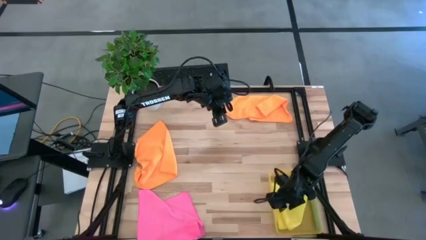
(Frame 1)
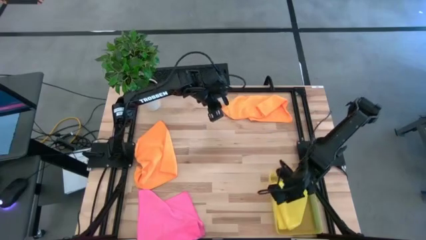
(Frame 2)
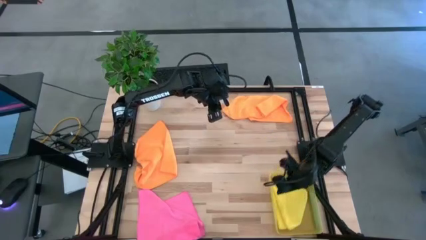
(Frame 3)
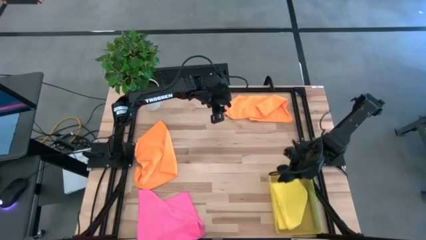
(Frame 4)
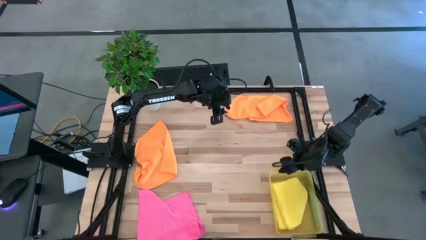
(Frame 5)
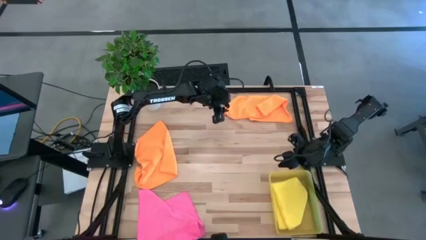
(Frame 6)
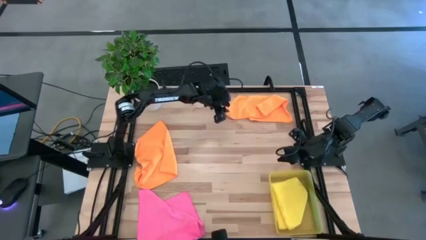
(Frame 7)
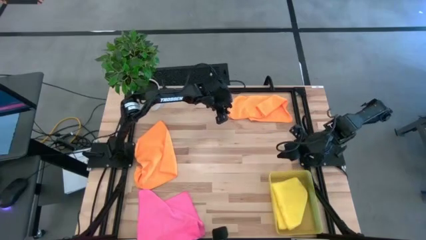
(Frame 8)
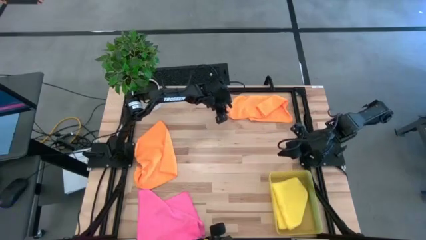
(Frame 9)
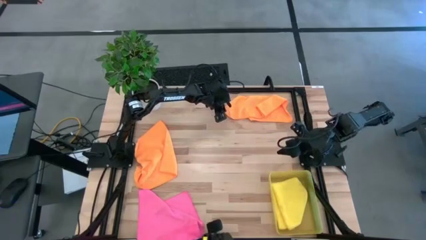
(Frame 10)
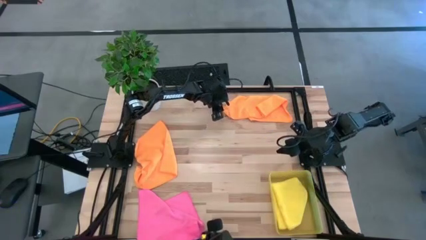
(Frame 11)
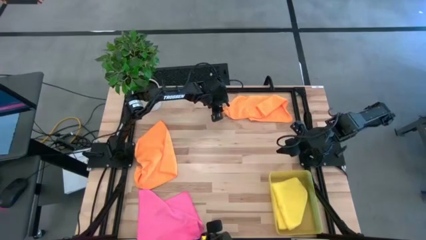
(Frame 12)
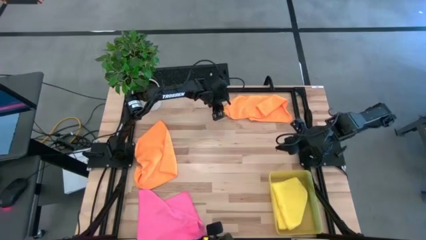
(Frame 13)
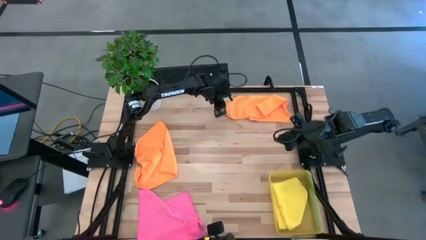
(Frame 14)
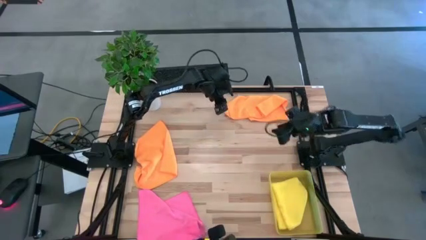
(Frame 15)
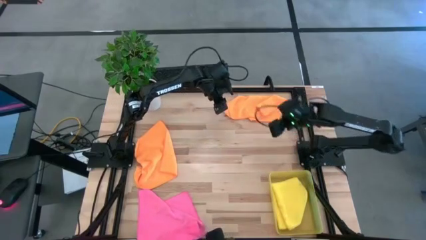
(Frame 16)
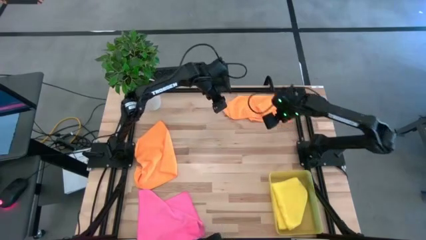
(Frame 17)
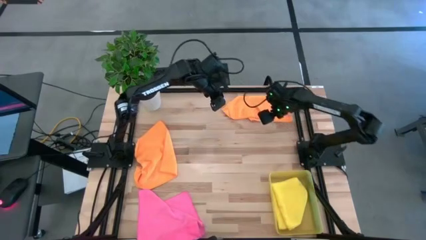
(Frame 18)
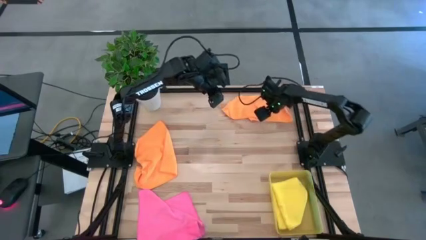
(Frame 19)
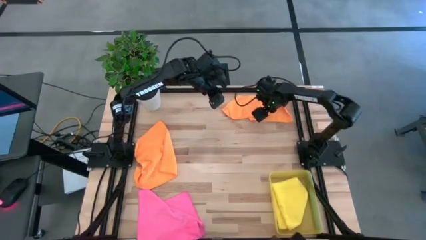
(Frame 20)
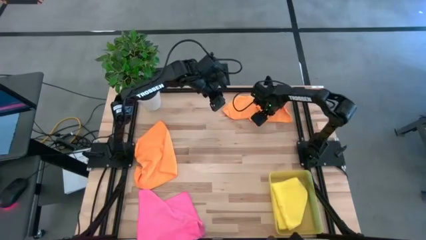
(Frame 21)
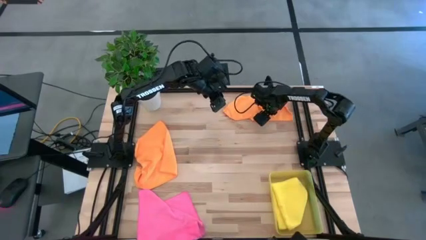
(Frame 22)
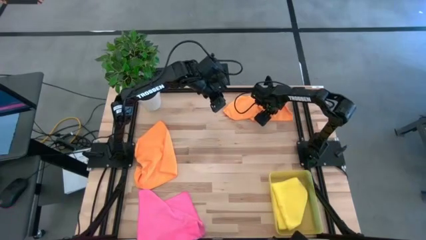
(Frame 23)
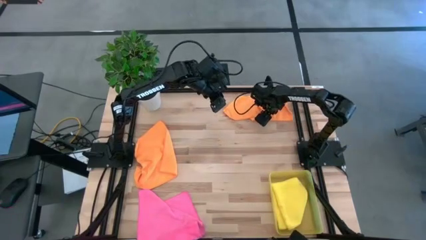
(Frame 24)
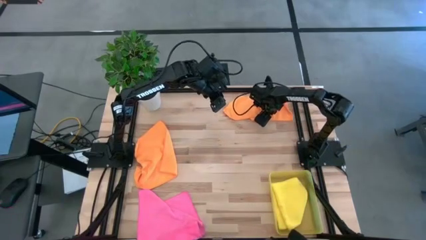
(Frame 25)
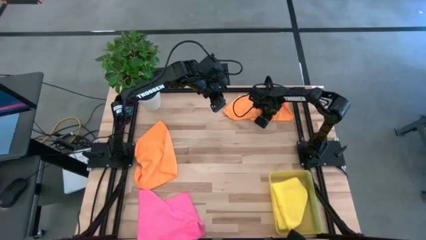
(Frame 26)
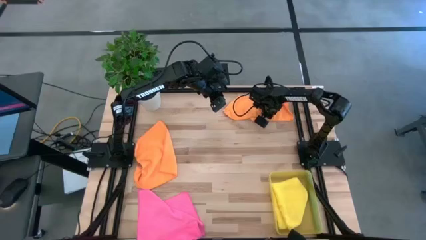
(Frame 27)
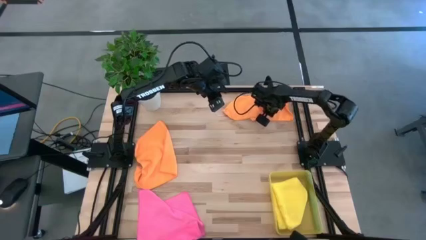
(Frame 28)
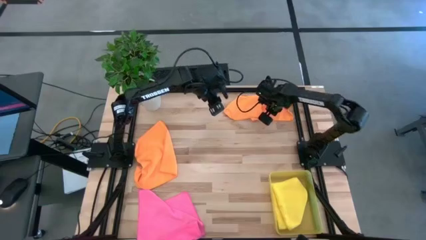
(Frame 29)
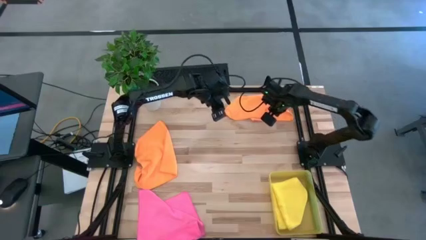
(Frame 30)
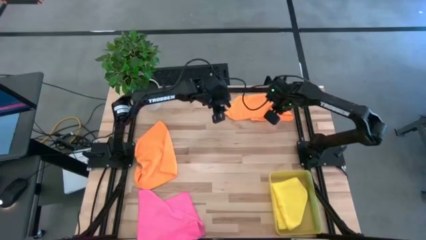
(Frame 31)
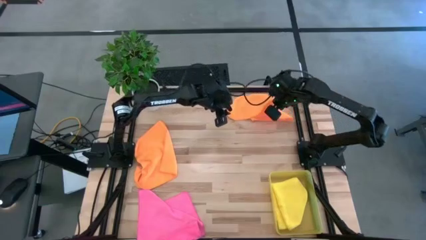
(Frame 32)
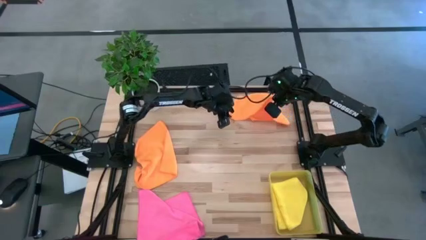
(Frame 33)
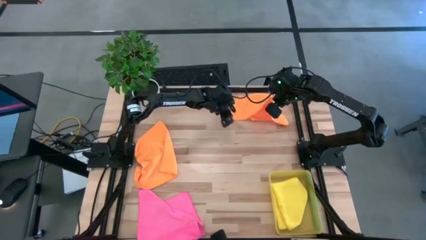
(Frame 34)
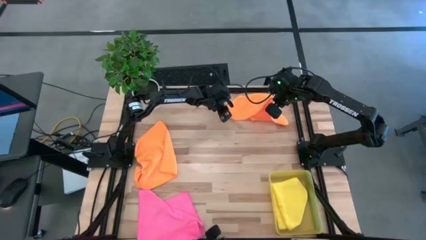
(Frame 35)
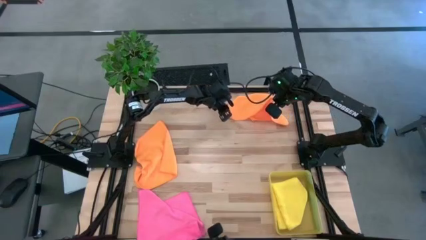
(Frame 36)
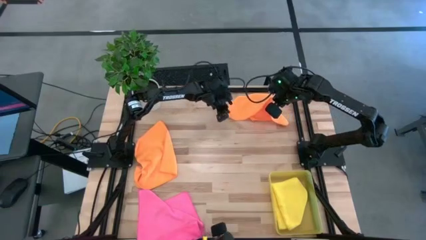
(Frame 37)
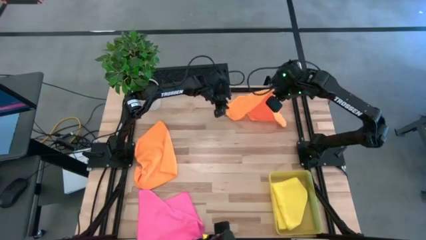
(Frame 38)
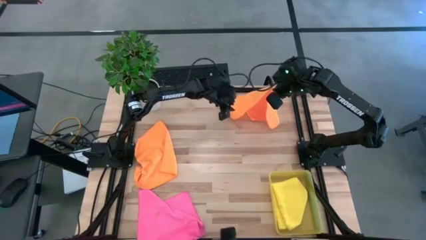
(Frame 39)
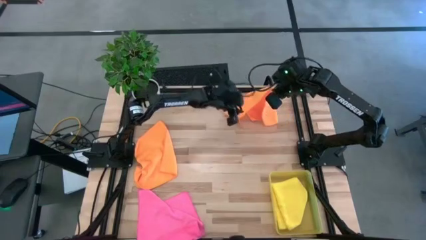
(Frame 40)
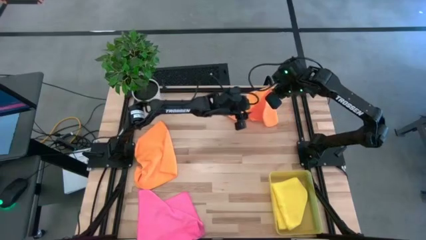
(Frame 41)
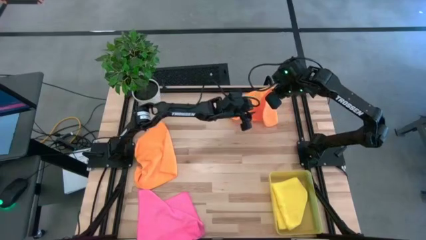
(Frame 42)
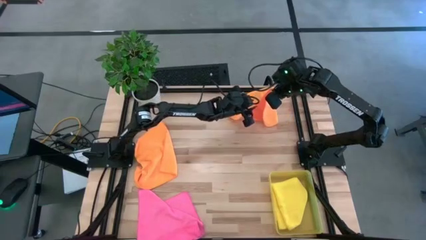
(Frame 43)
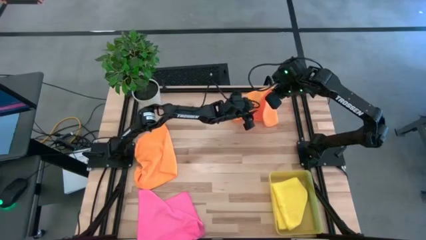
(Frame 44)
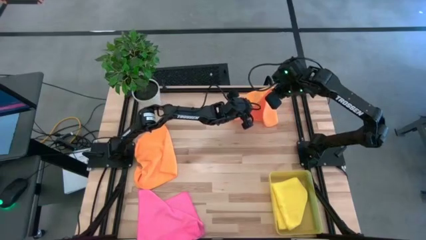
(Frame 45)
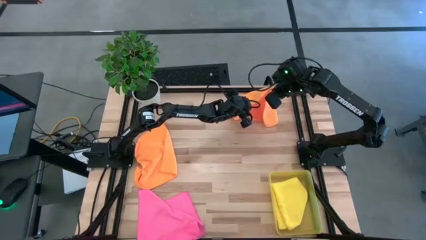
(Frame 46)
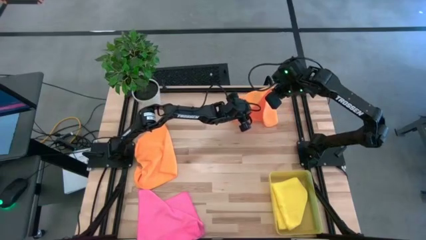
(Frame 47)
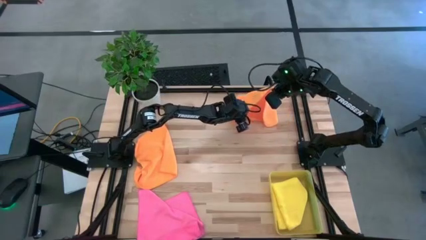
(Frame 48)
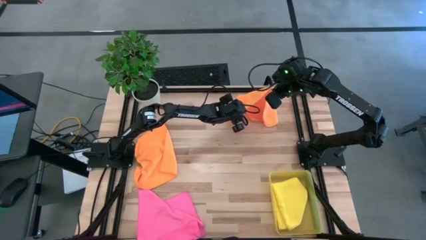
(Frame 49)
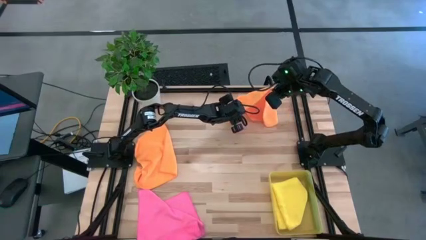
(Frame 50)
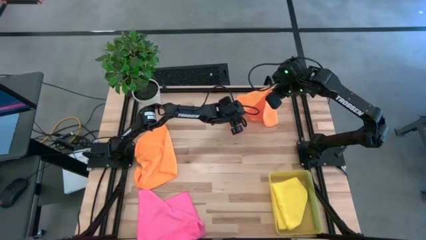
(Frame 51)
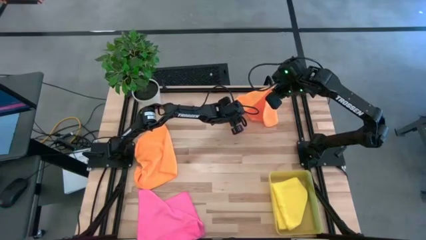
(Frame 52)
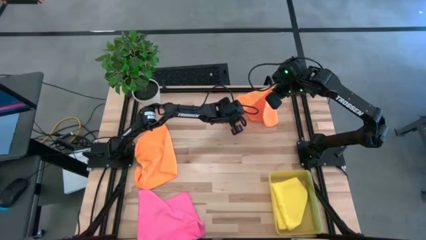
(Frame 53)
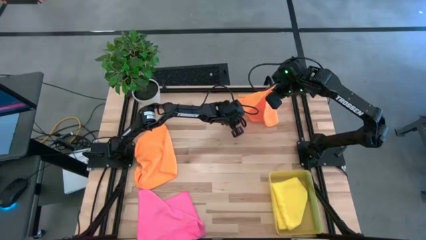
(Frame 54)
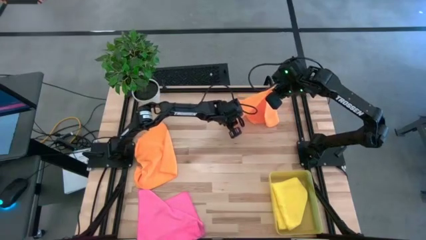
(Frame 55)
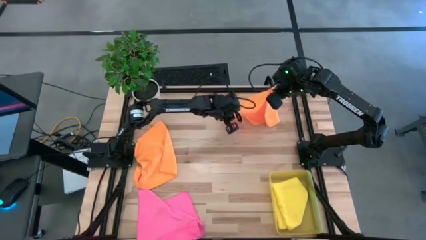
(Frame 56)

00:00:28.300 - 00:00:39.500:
Task: Fold microfiber towels
Fold the top right orange cloth

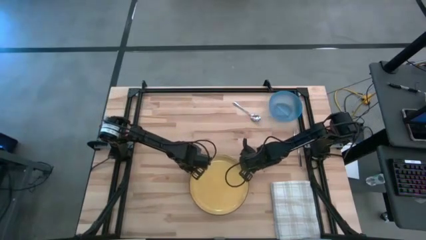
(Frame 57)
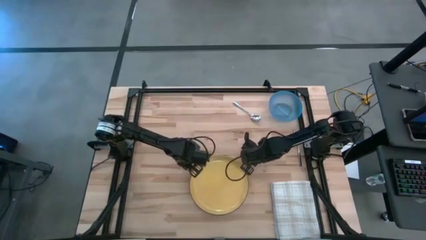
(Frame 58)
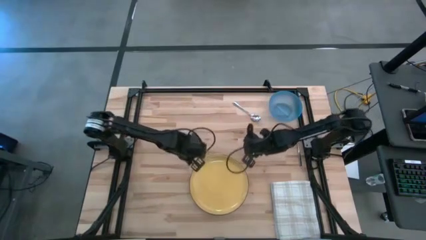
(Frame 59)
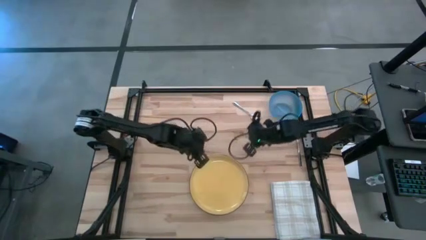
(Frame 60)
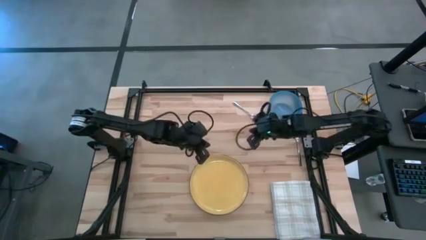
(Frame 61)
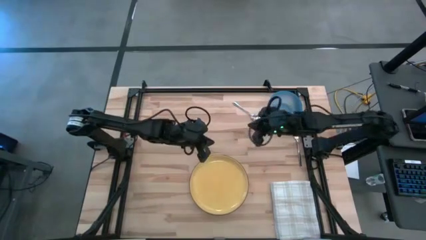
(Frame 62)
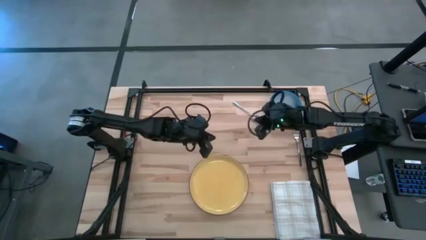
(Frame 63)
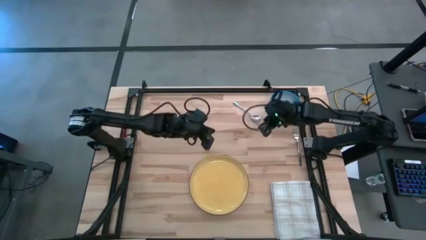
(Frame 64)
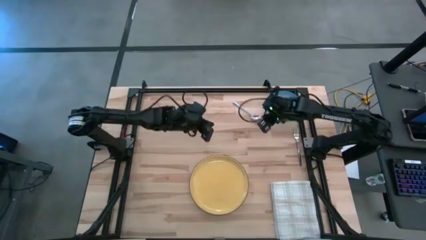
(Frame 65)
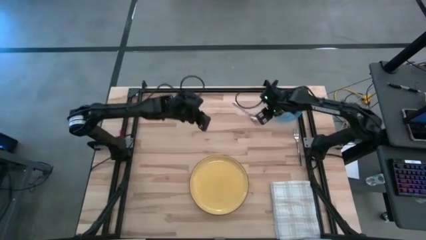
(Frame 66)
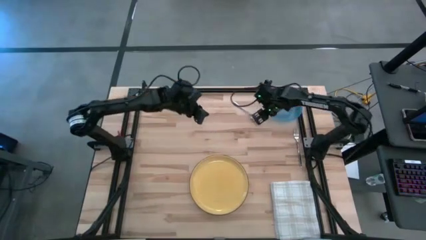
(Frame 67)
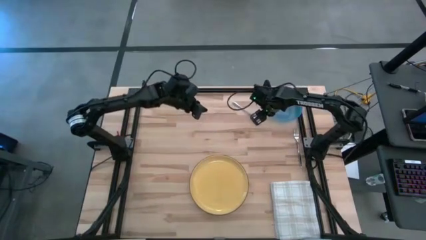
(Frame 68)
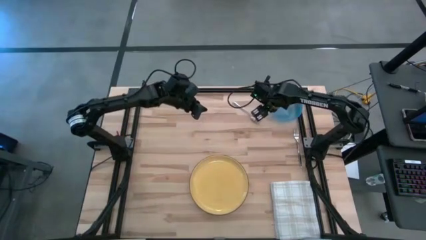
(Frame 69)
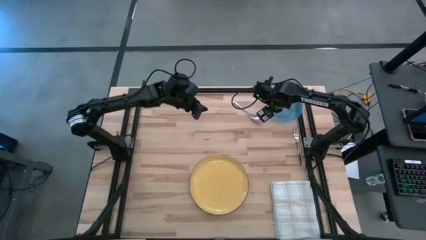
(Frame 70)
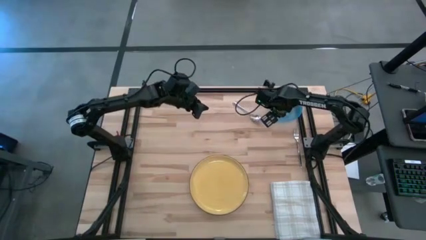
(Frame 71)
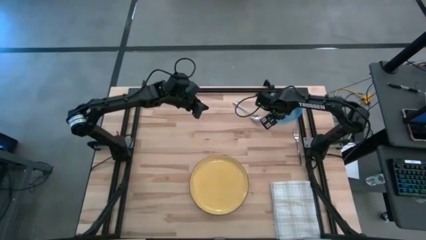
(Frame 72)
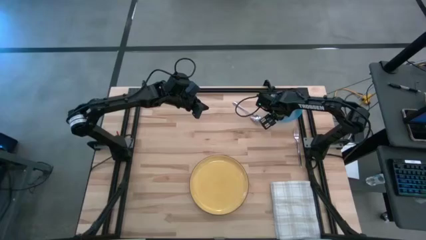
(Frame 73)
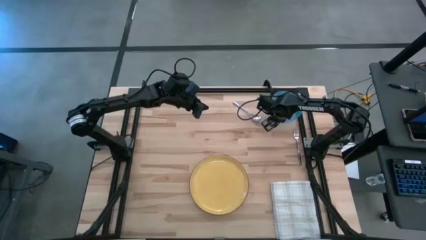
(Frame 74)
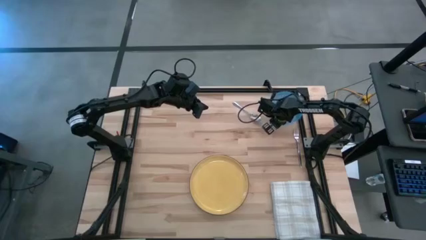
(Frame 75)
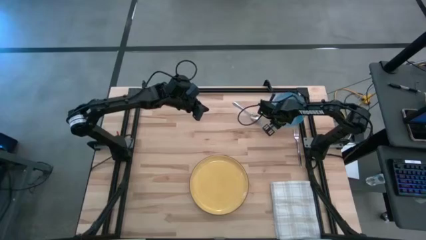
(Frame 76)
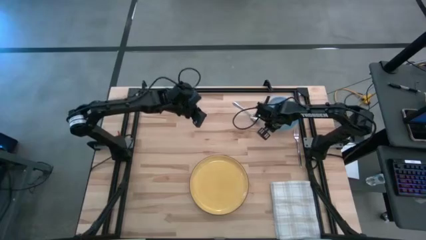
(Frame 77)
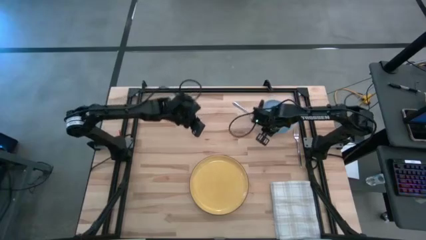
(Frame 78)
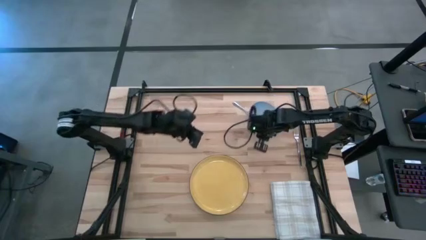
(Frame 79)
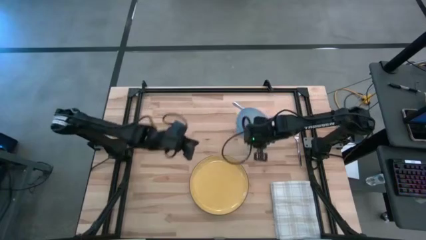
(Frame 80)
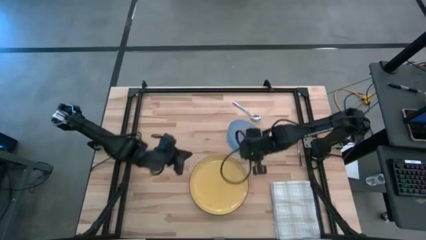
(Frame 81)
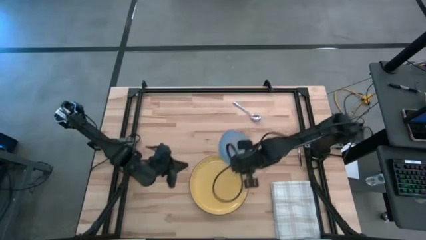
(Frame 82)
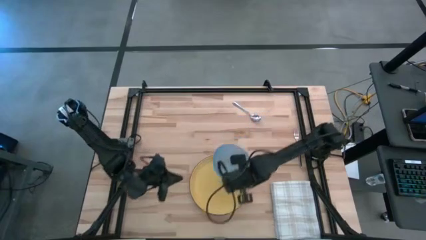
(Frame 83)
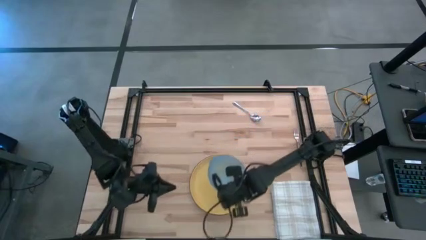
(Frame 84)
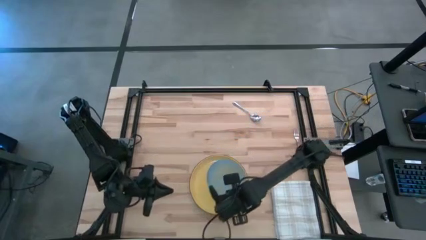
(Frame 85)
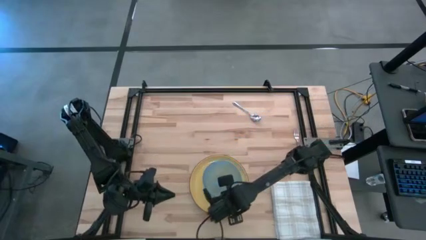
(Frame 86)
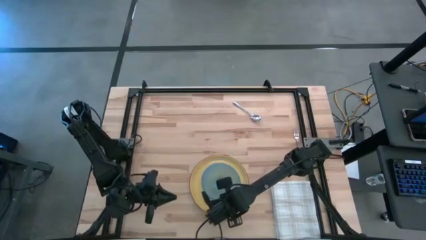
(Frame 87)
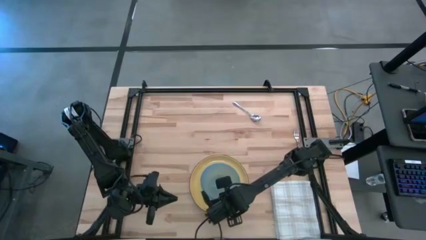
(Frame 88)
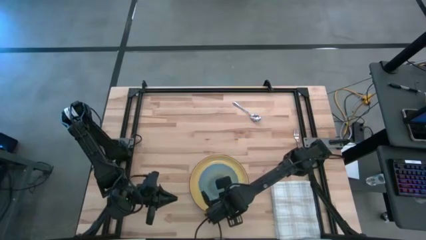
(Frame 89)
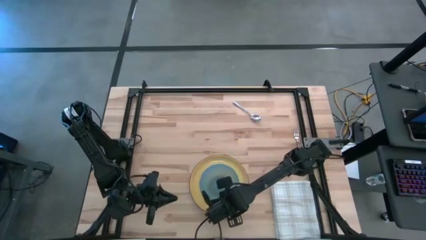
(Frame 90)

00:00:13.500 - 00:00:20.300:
Task: Set table place
Put the blue bowl on top of the yellow plate
